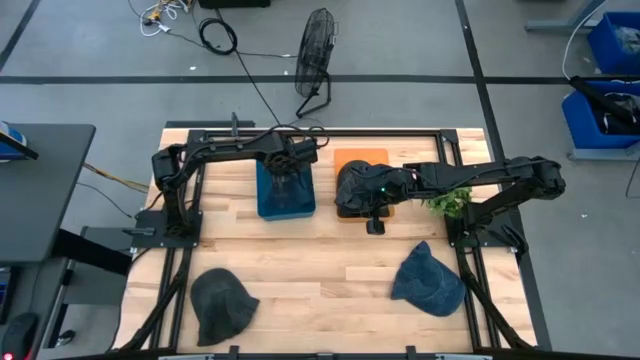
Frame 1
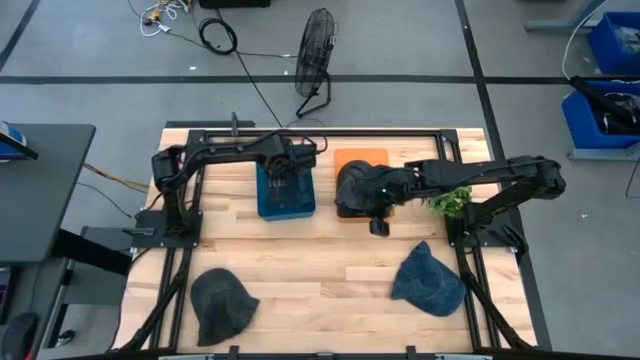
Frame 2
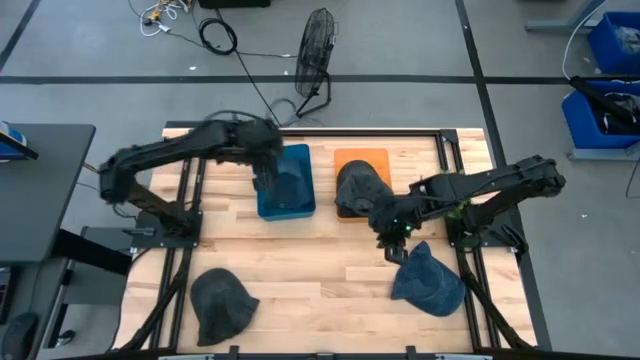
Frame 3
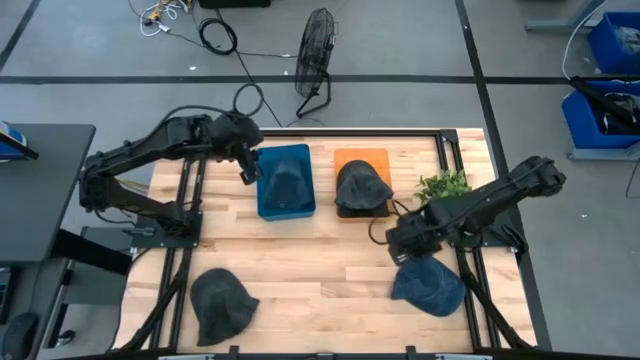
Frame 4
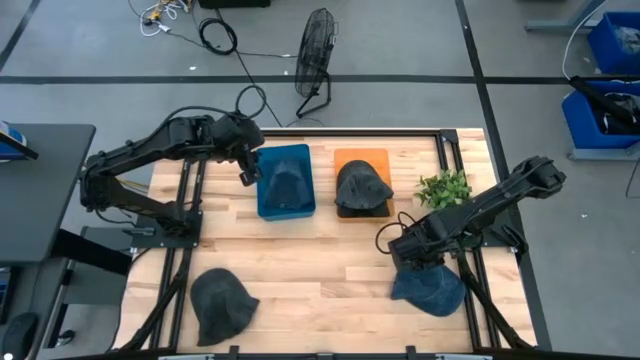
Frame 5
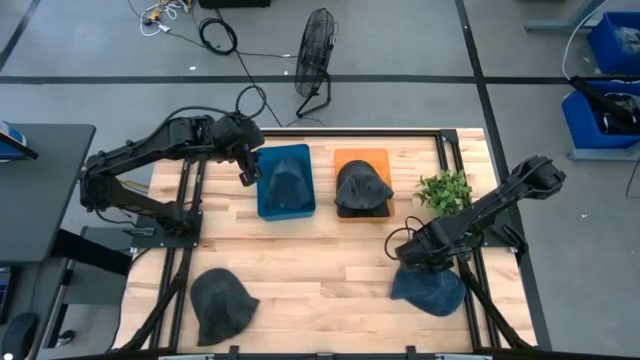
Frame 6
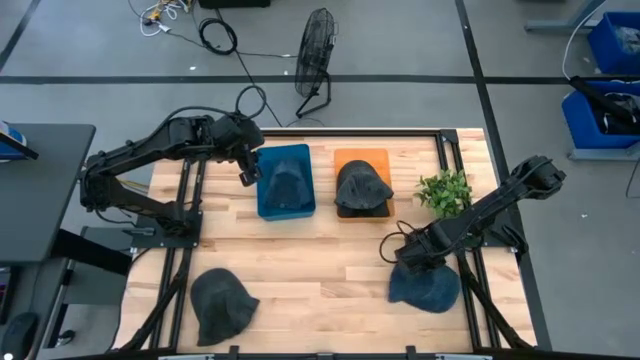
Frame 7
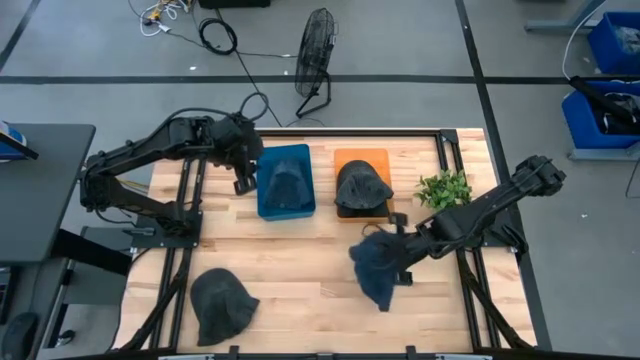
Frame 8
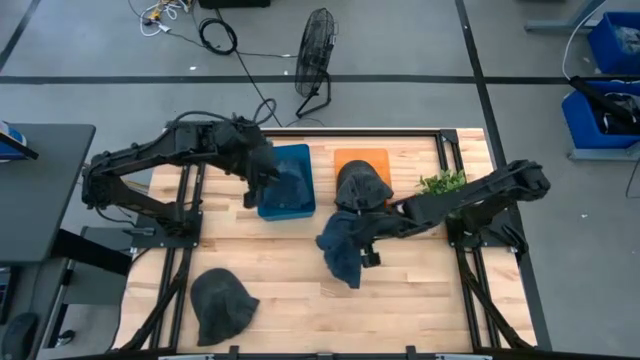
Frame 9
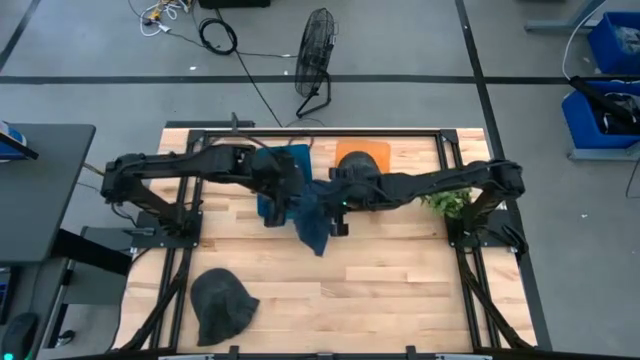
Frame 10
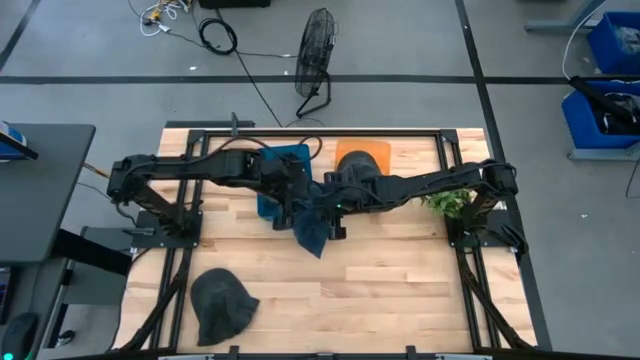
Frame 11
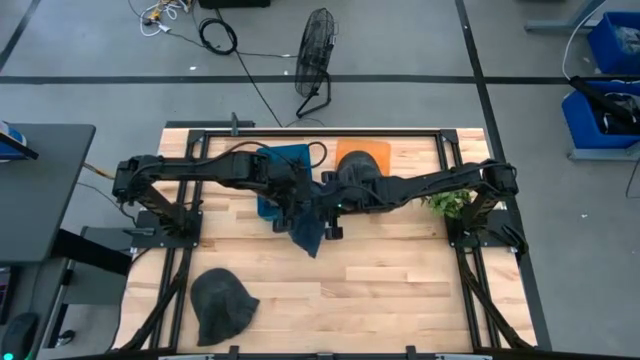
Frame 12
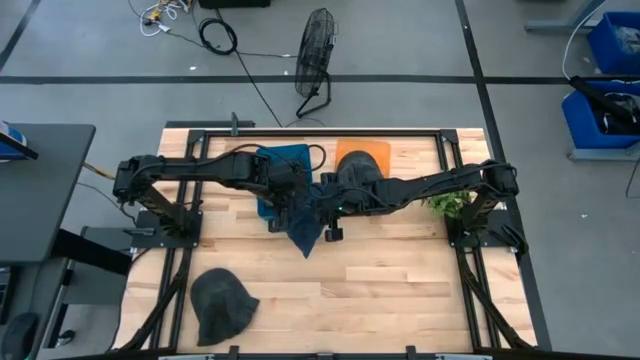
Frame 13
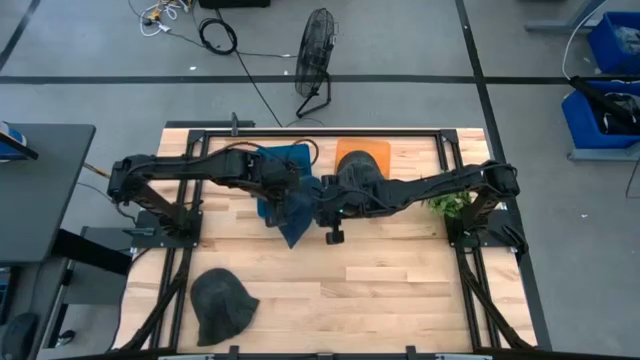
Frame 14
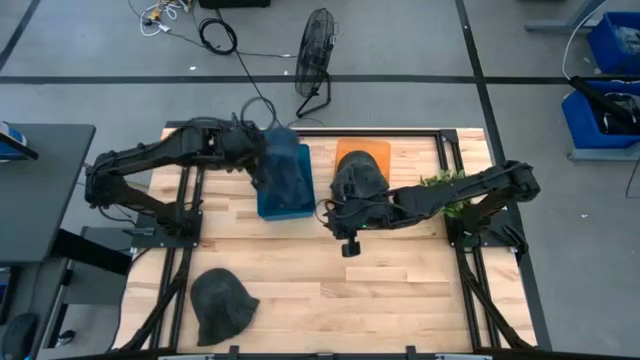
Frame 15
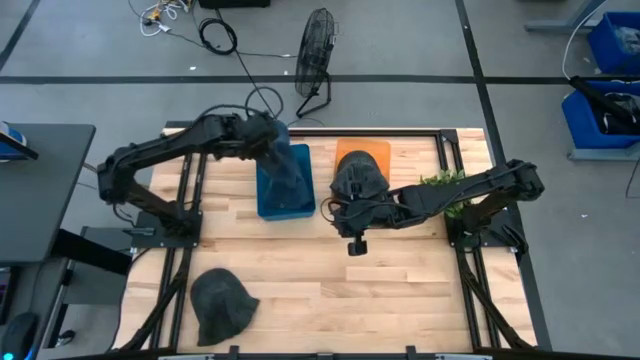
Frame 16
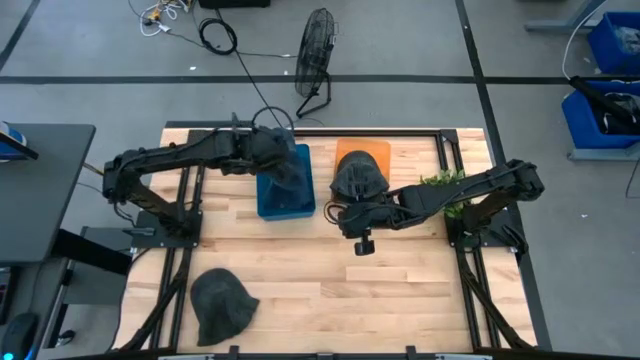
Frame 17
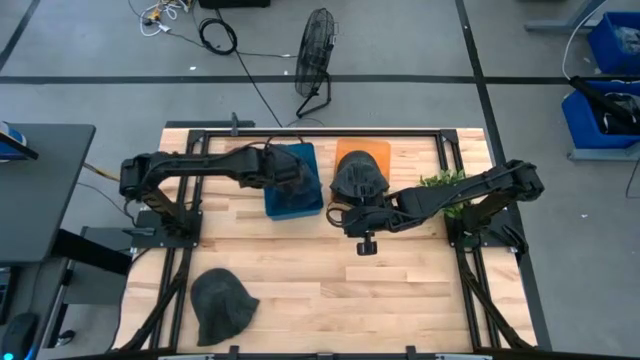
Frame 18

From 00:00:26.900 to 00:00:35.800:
Task: Pick & Place hat
Put the blue cap into the blue bin

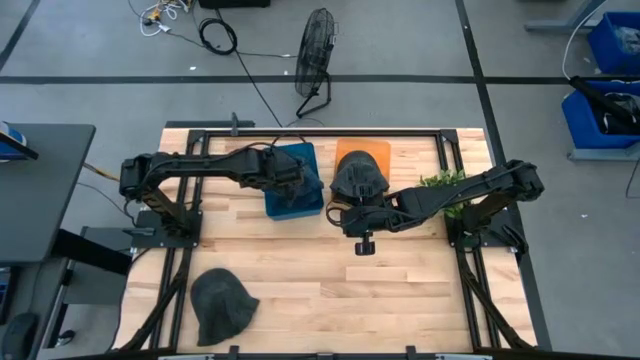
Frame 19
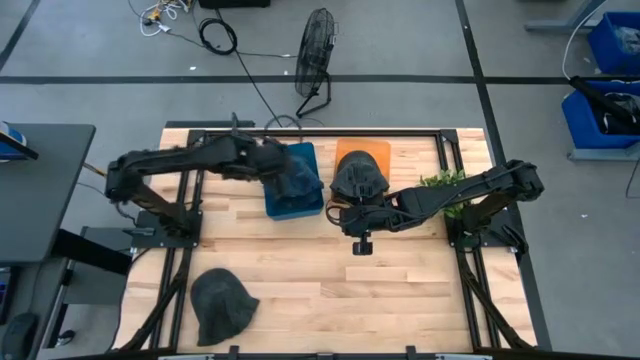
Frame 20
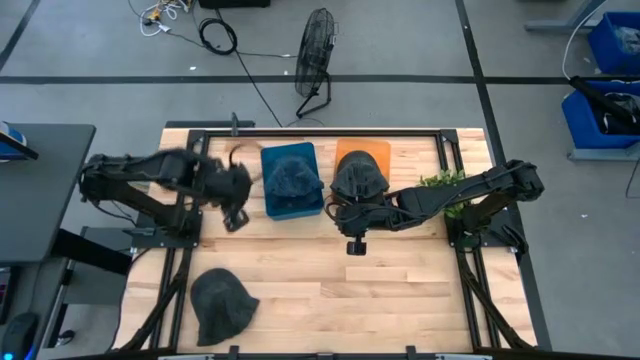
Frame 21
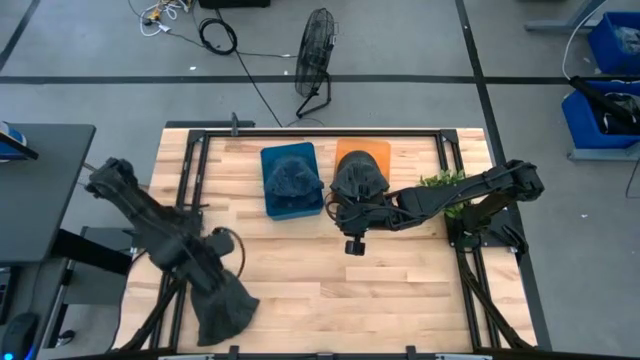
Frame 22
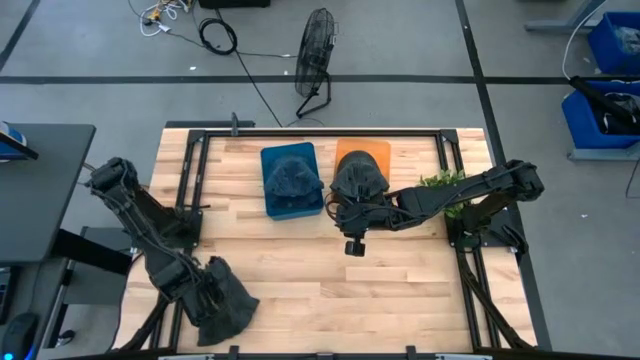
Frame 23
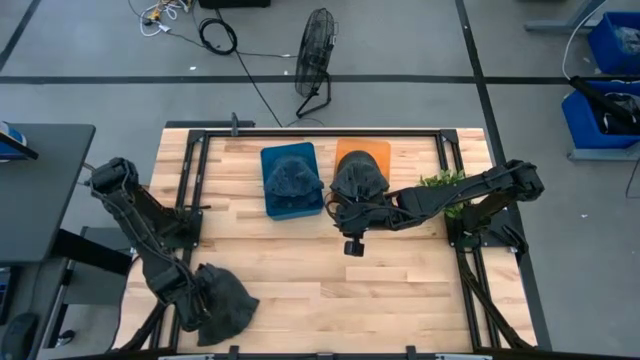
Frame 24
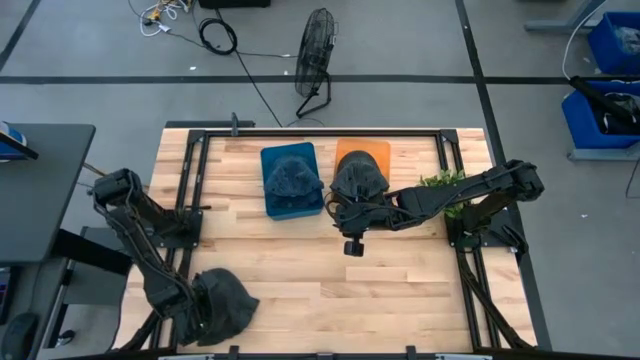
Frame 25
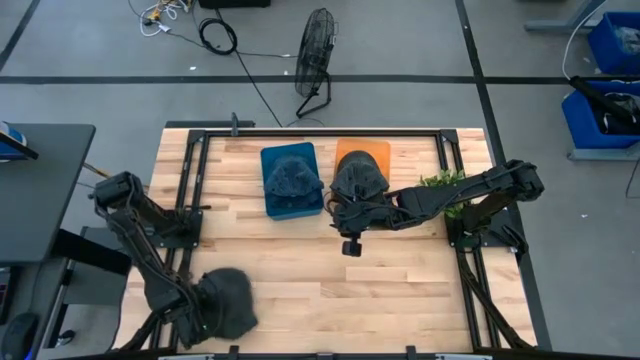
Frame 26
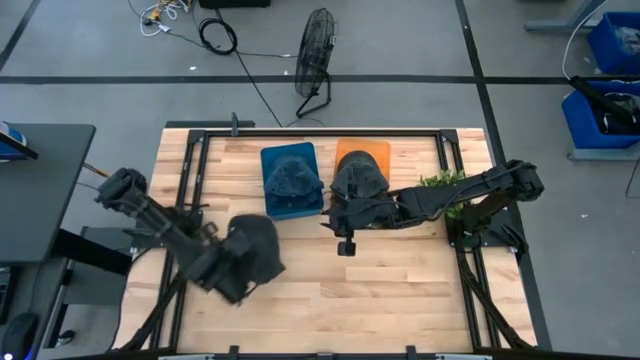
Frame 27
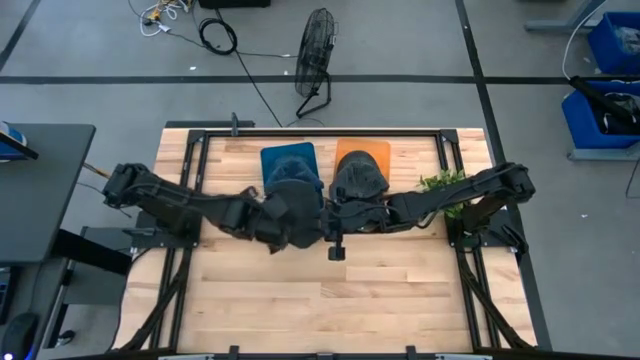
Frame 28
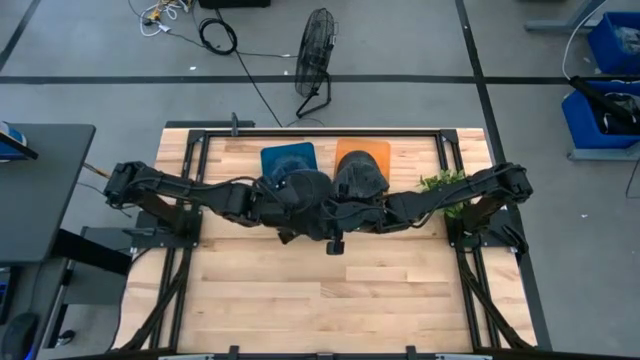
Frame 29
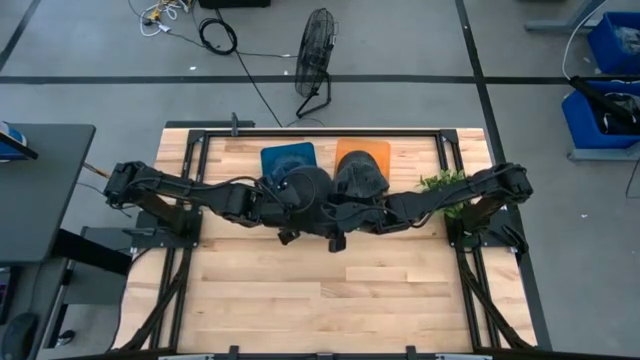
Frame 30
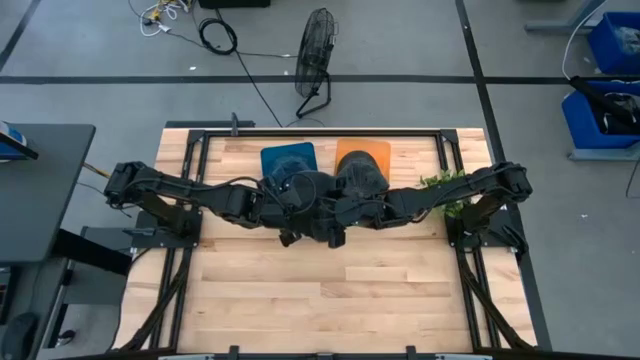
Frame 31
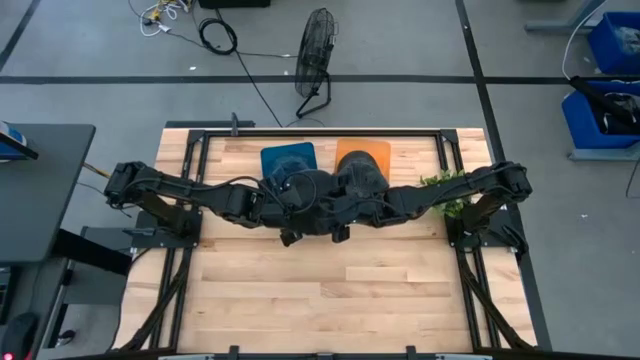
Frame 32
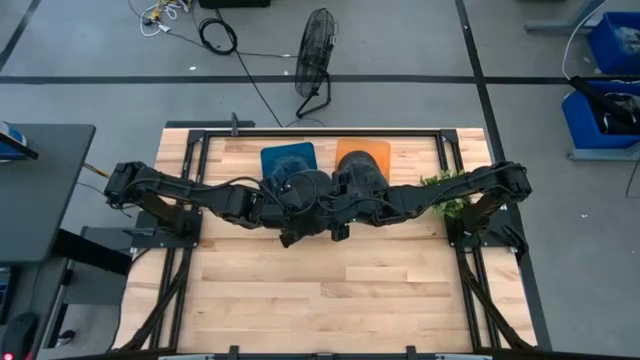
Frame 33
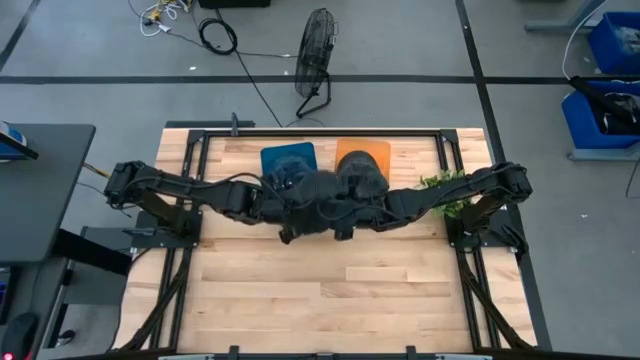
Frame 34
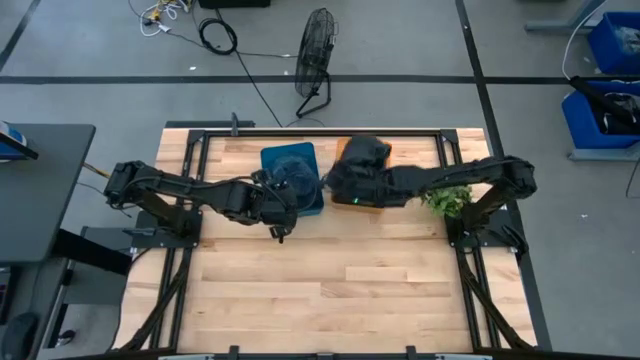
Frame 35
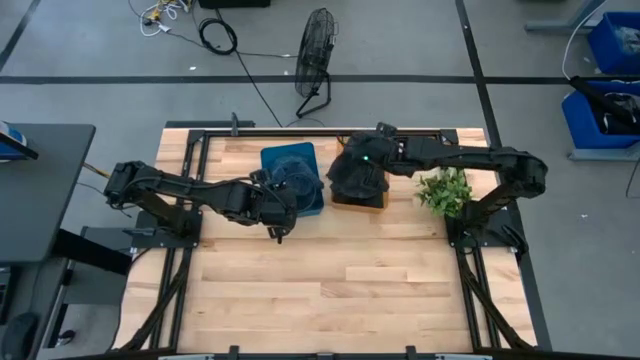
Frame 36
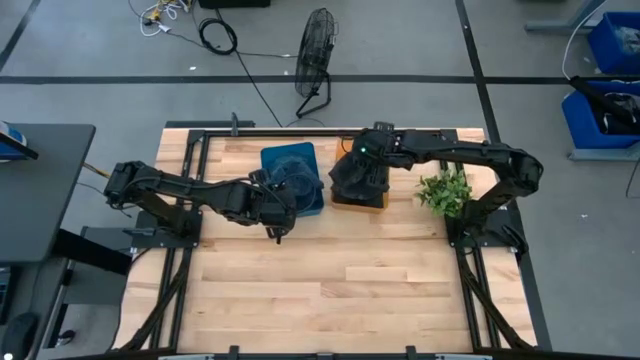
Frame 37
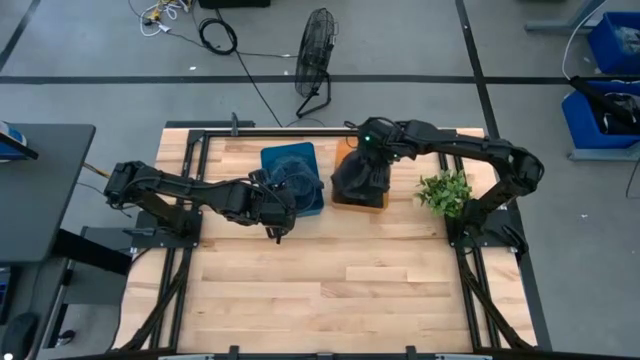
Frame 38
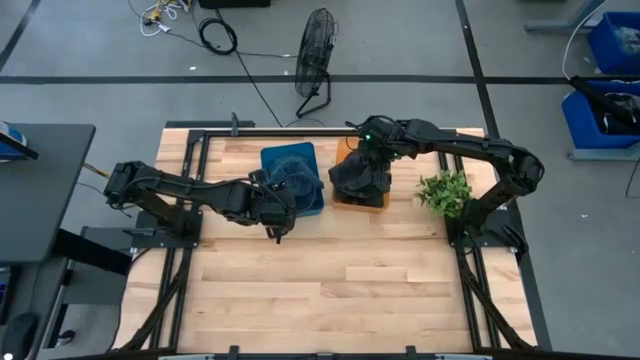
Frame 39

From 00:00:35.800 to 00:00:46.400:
Put the gray cap into the orange bin

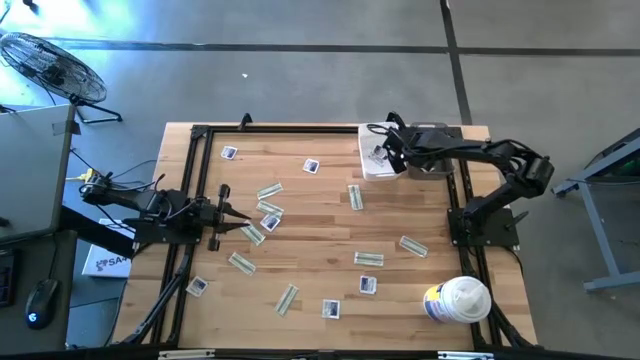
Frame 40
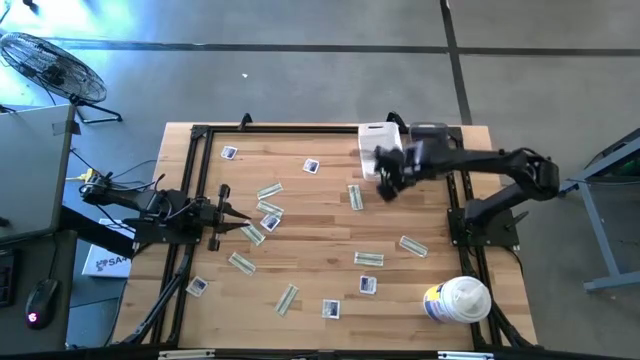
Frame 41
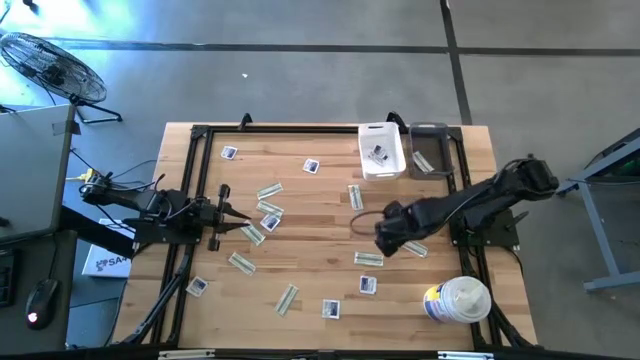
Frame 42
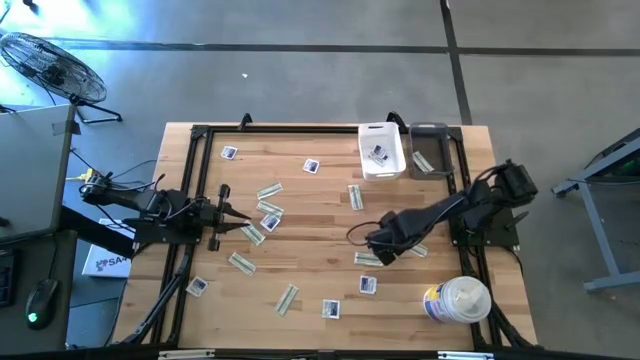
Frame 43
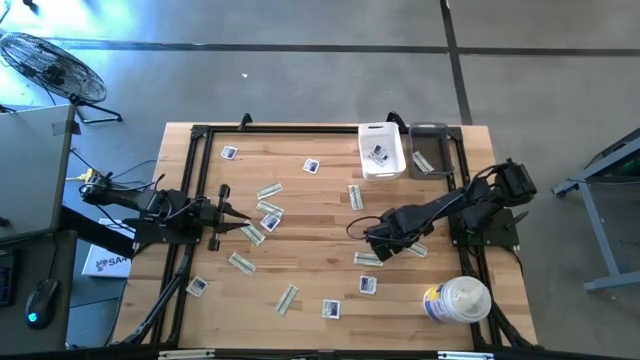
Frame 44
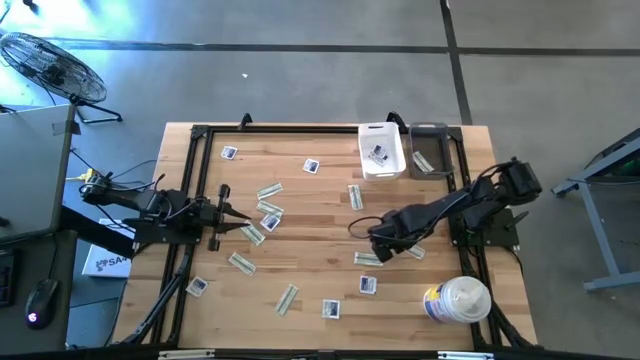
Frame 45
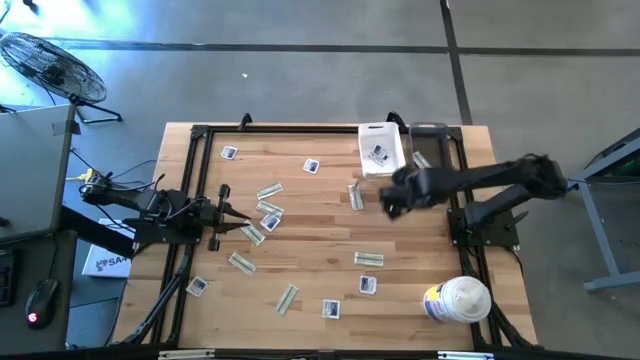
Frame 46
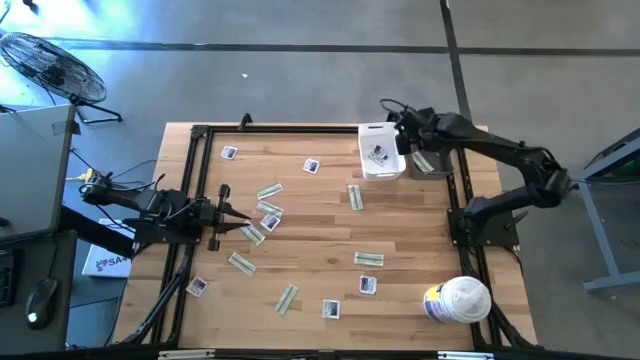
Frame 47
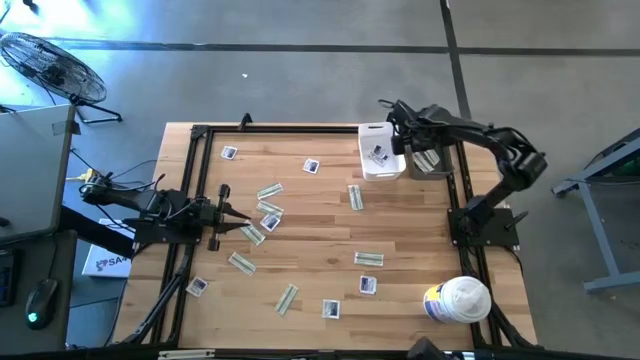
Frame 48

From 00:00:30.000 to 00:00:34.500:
Task: Pick & Place First Aid Supplies
Put the bandage into the gray bin
